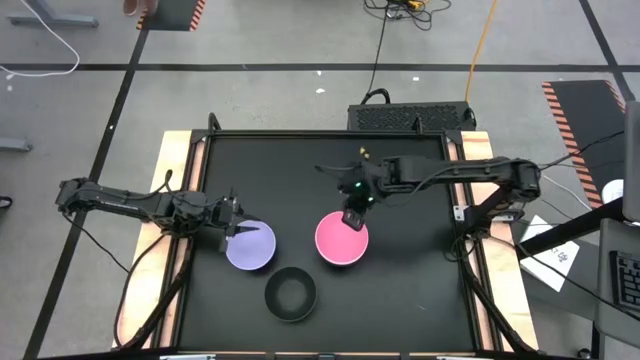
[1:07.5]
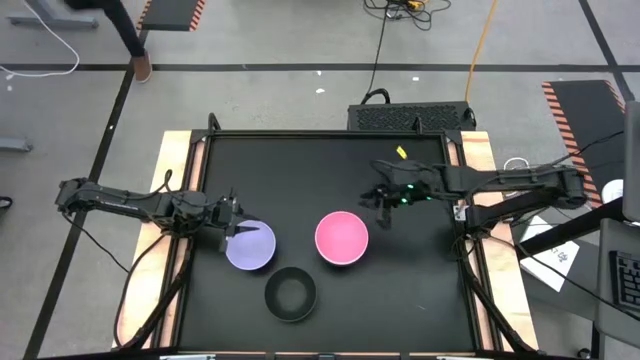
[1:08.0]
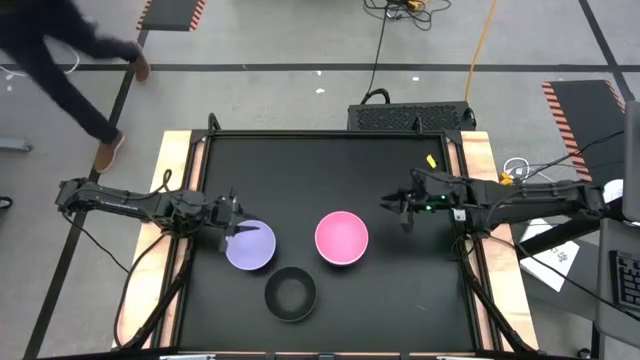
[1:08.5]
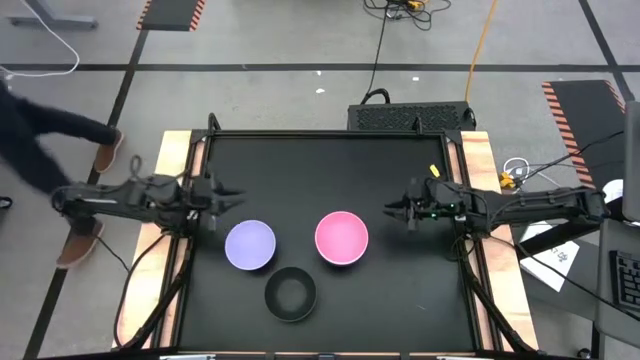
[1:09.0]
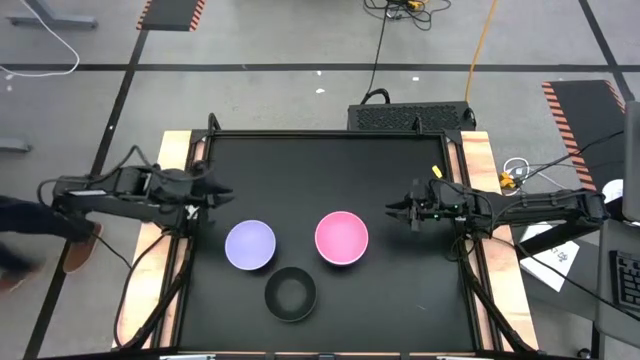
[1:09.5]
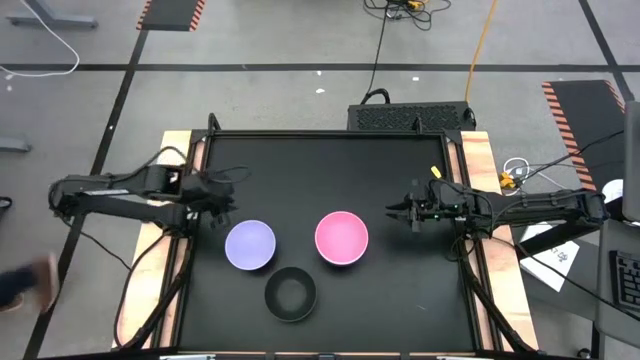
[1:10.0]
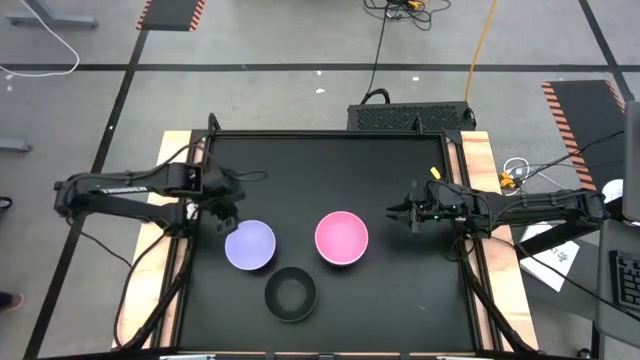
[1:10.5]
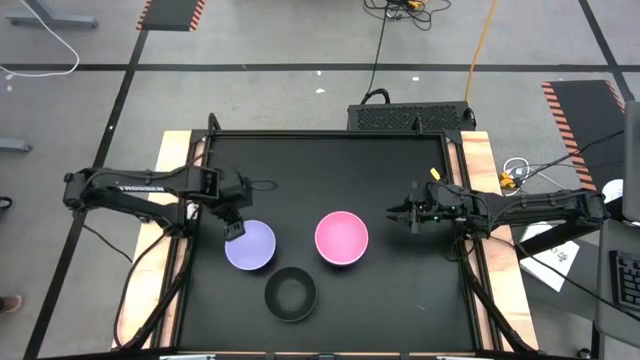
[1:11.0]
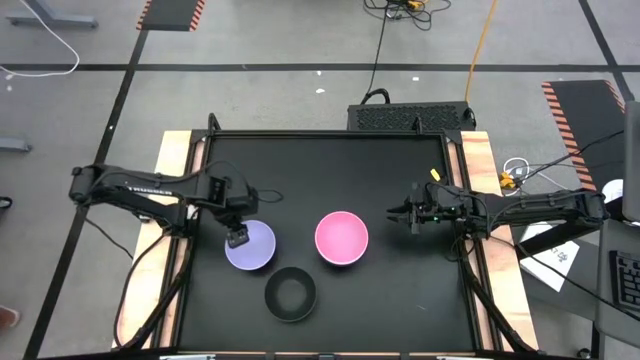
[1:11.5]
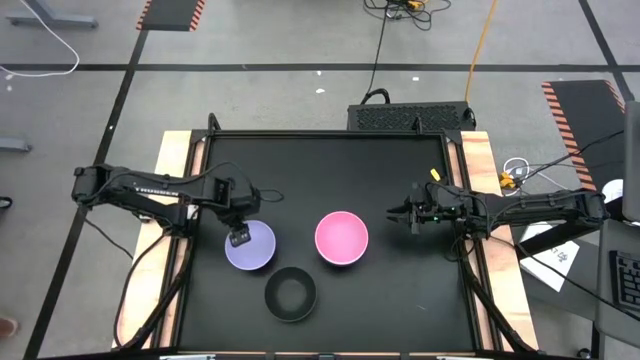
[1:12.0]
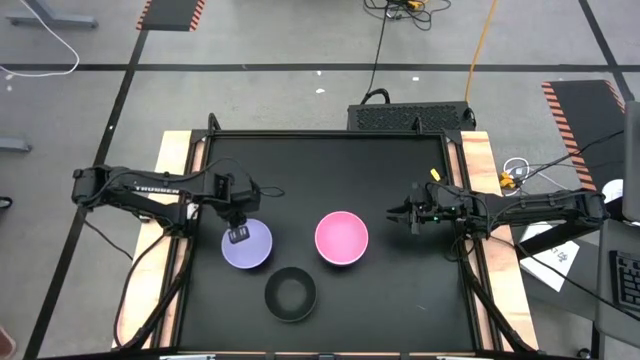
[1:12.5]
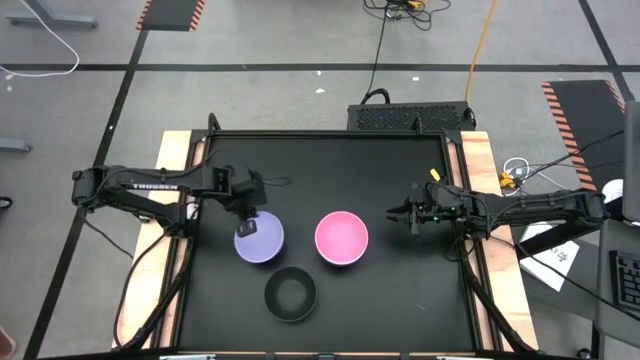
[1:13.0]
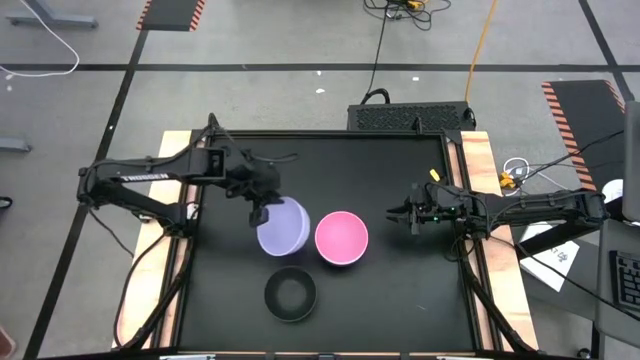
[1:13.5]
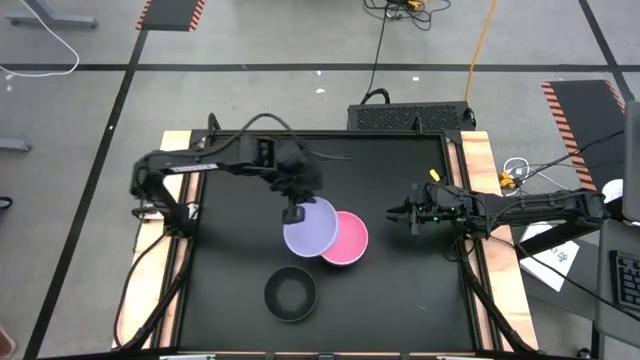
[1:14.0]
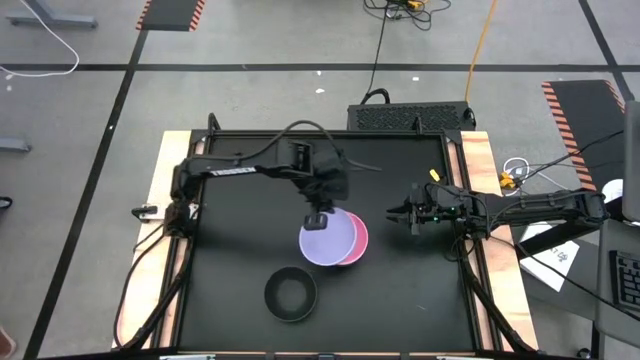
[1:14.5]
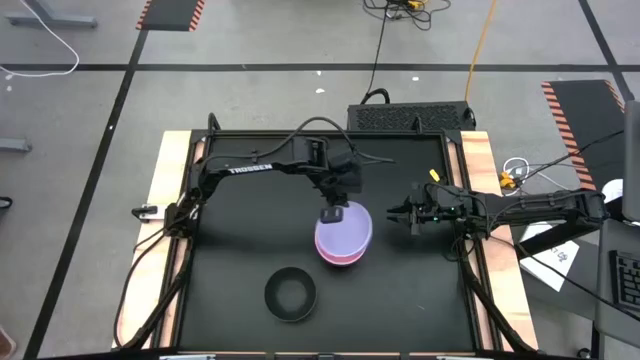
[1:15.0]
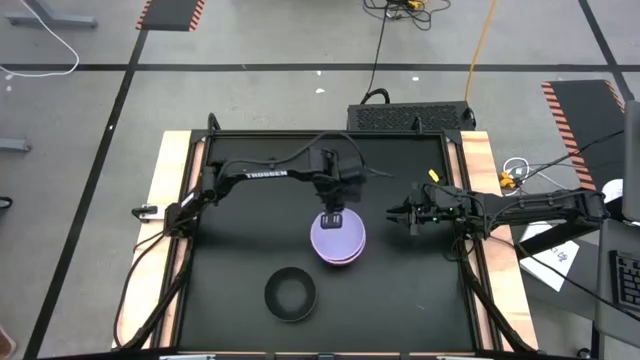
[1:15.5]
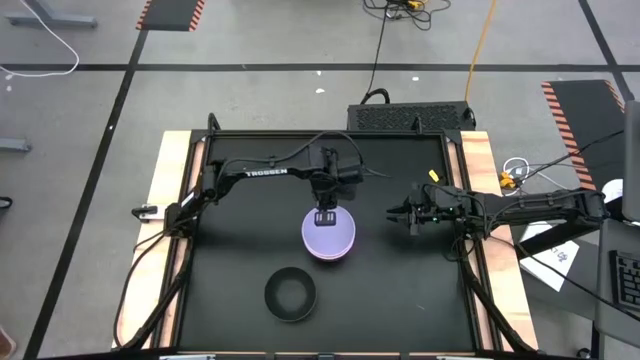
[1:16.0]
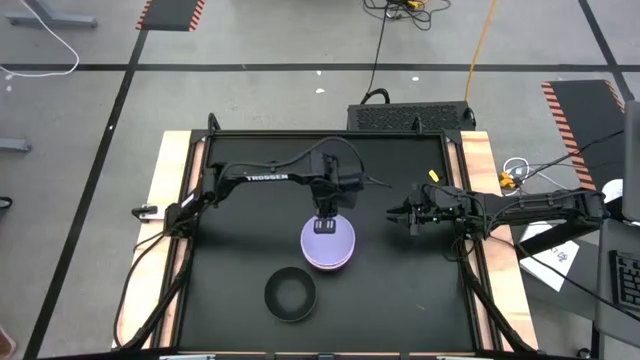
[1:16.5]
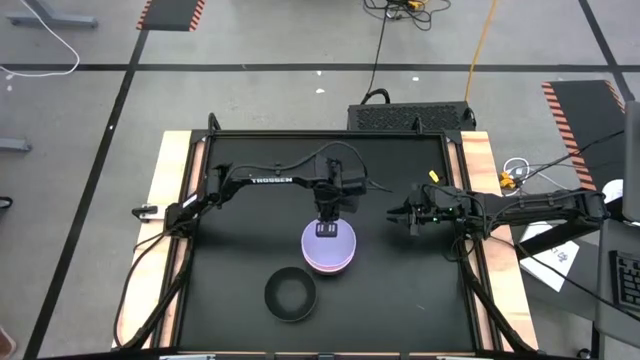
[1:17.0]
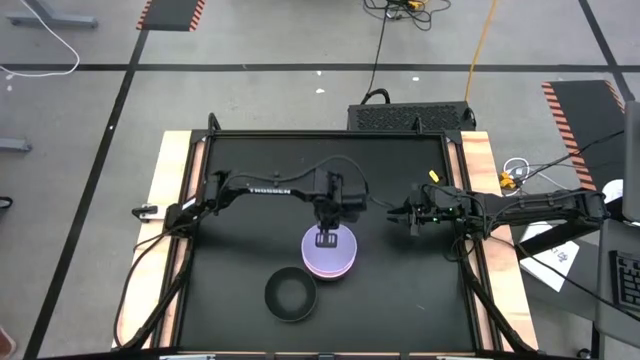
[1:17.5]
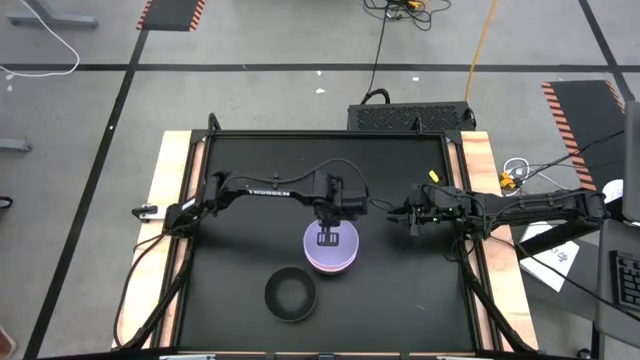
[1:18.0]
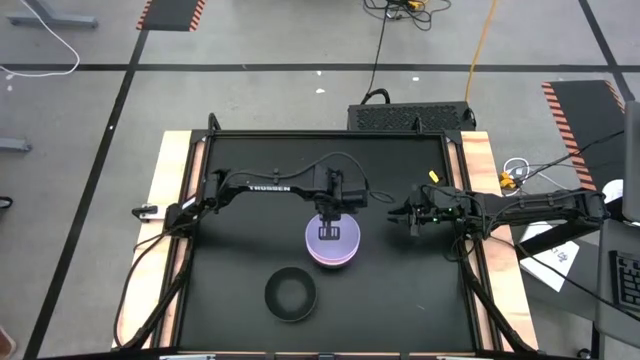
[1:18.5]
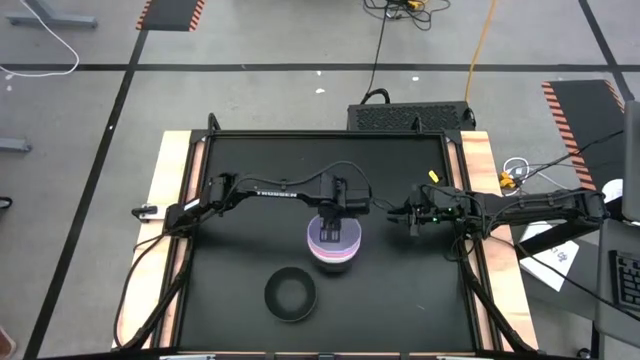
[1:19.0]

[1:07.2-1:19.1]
Task: Nest bowls inside each other
Stack the purple bowl on the top of pink bowl on the table
